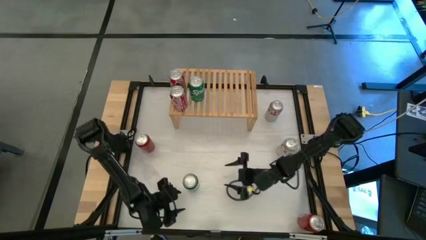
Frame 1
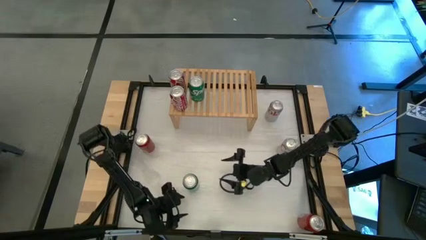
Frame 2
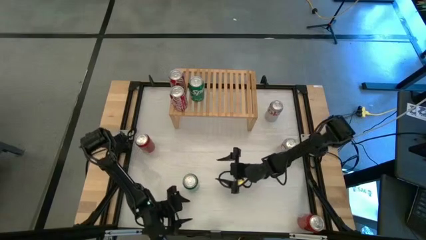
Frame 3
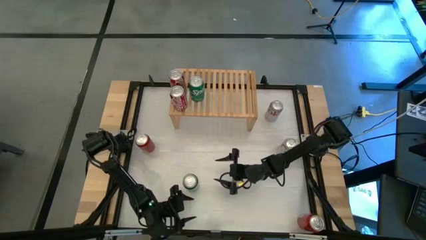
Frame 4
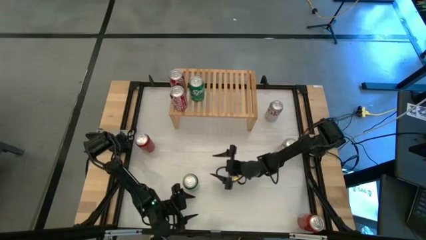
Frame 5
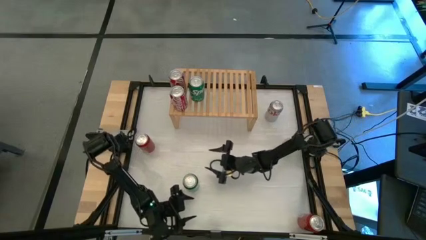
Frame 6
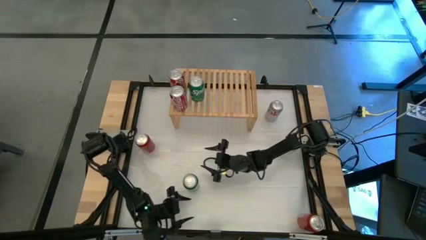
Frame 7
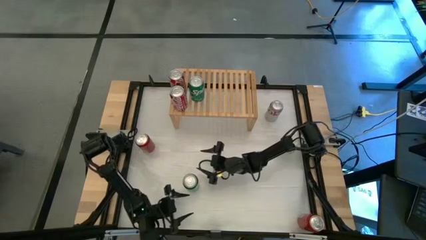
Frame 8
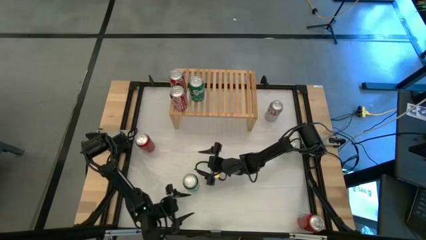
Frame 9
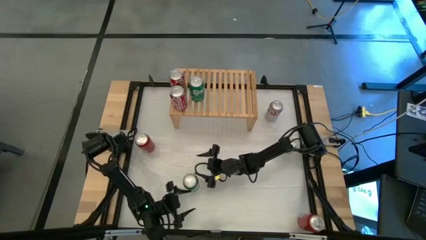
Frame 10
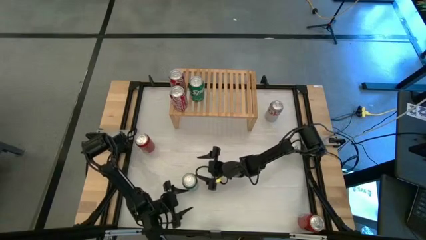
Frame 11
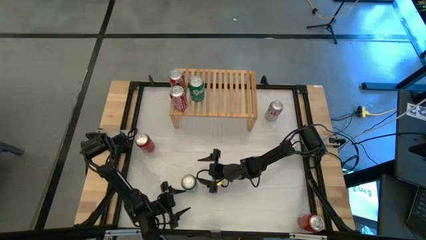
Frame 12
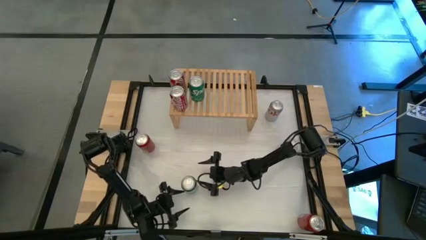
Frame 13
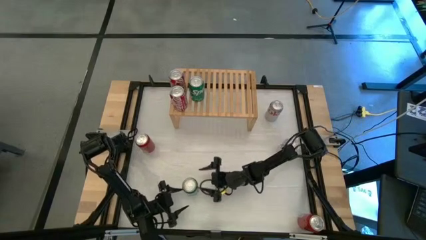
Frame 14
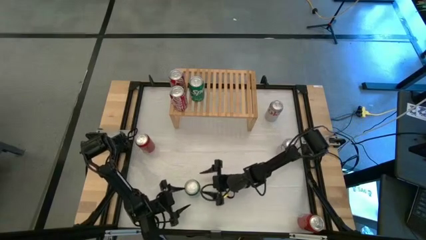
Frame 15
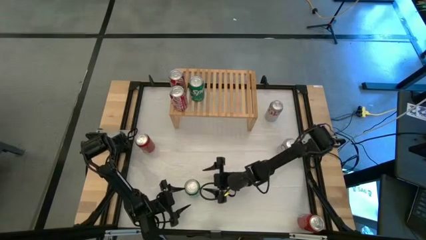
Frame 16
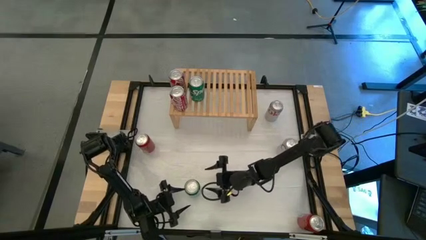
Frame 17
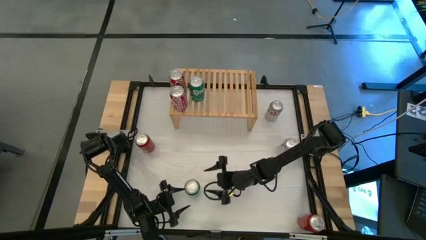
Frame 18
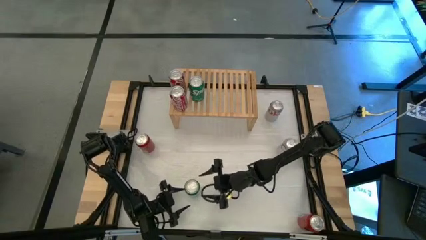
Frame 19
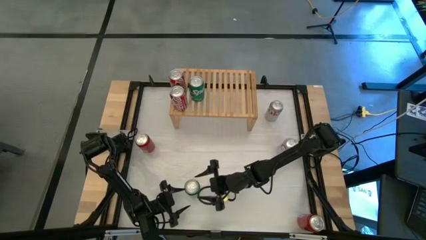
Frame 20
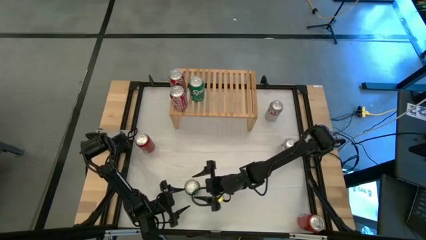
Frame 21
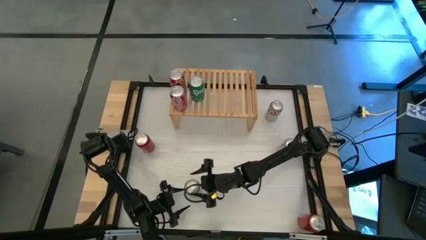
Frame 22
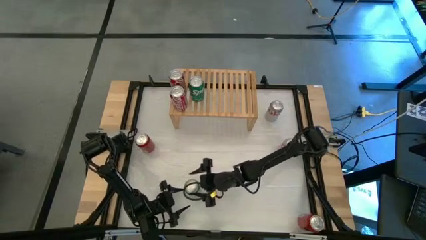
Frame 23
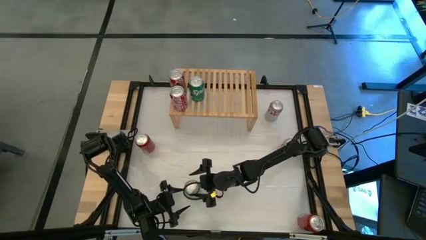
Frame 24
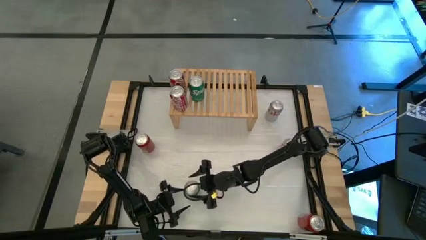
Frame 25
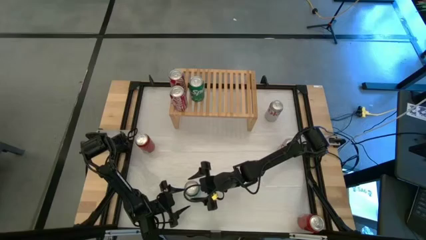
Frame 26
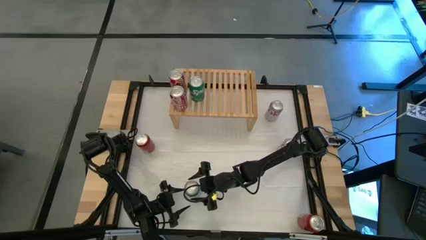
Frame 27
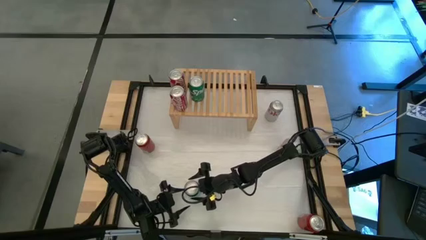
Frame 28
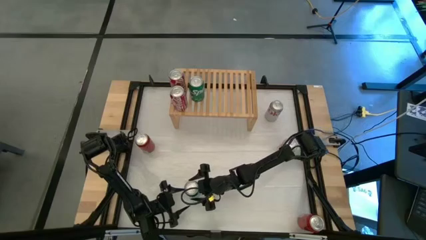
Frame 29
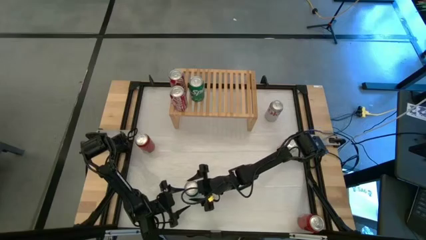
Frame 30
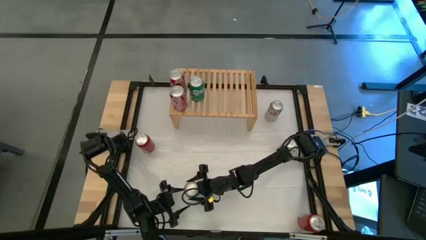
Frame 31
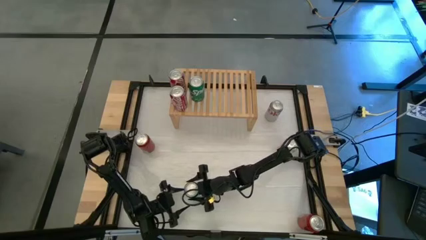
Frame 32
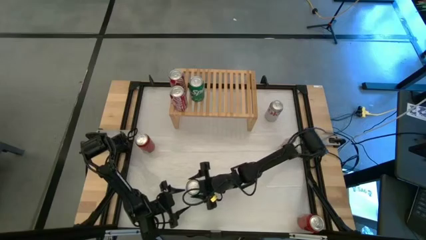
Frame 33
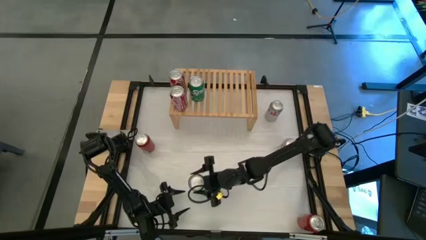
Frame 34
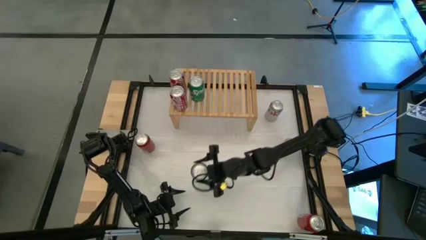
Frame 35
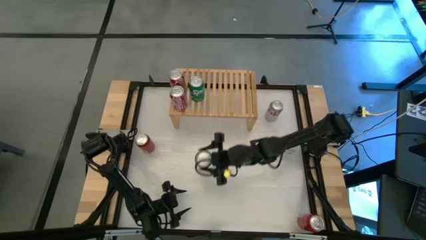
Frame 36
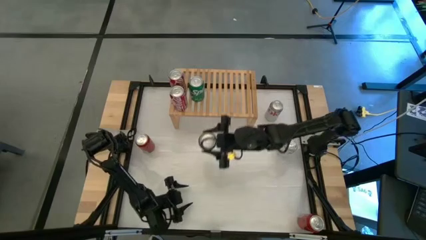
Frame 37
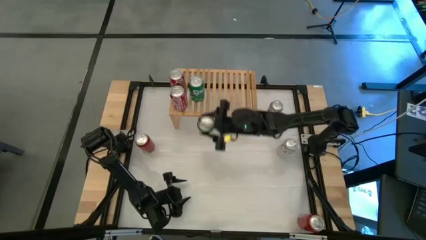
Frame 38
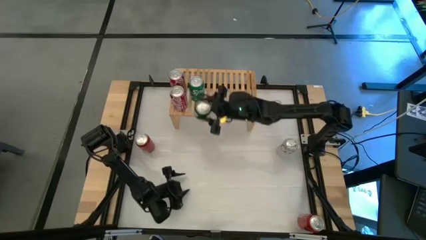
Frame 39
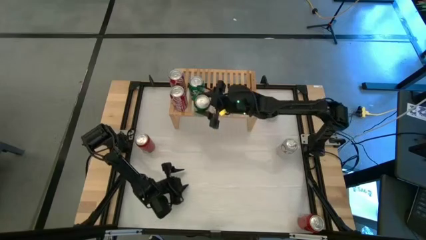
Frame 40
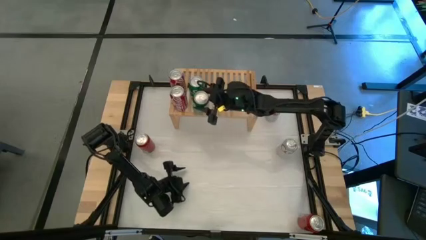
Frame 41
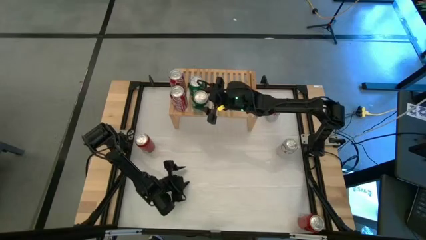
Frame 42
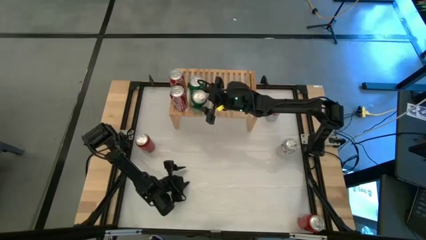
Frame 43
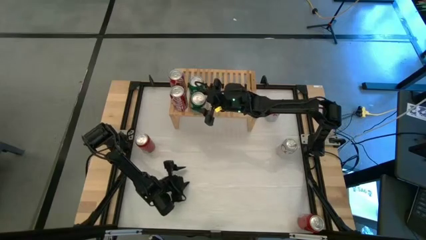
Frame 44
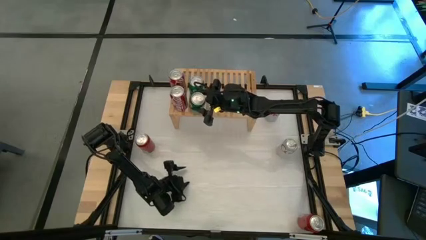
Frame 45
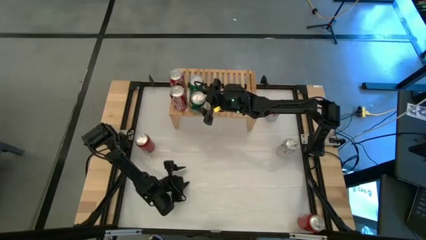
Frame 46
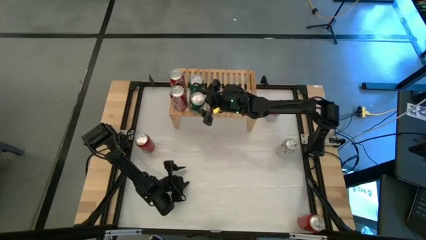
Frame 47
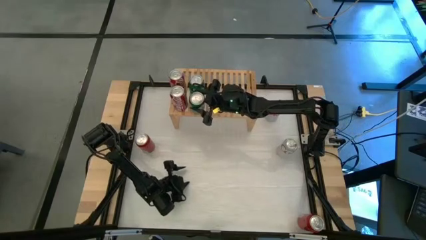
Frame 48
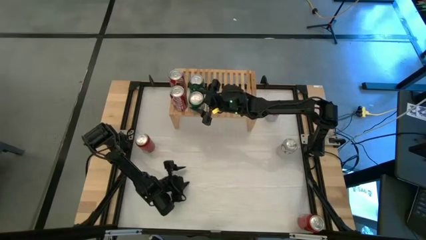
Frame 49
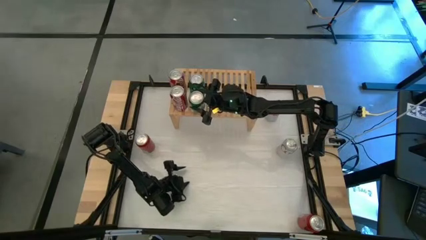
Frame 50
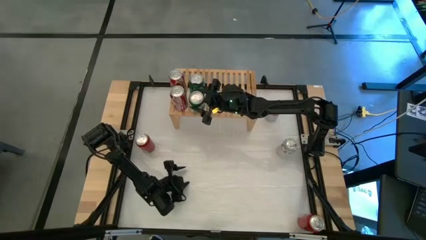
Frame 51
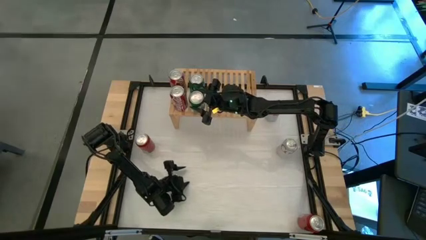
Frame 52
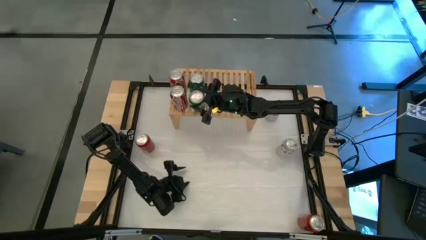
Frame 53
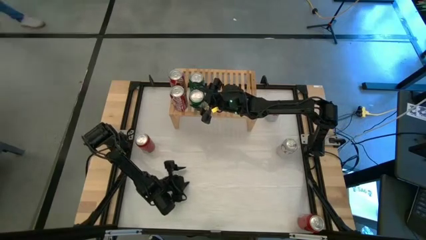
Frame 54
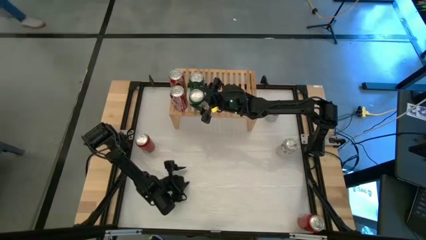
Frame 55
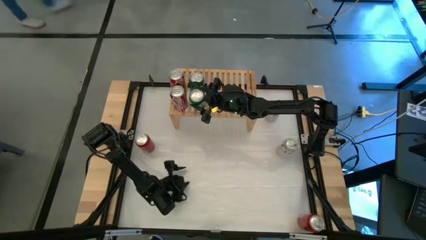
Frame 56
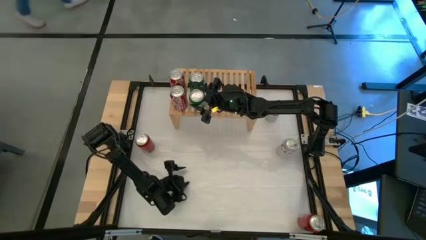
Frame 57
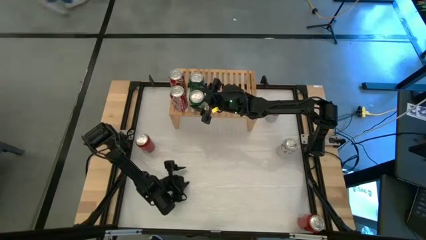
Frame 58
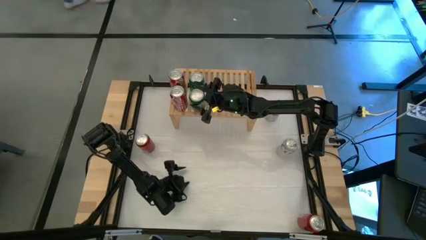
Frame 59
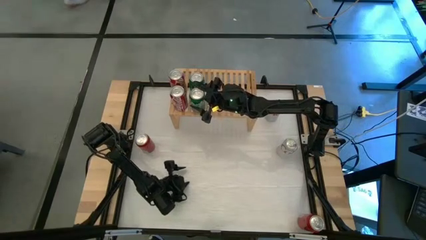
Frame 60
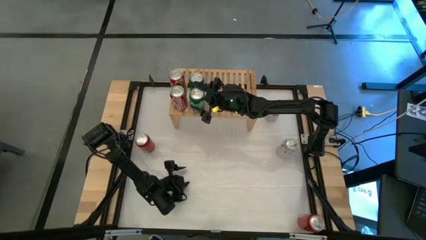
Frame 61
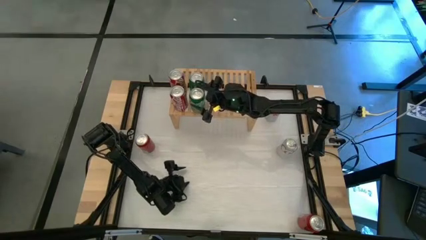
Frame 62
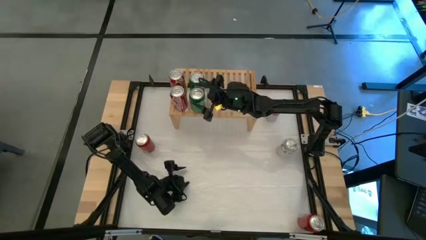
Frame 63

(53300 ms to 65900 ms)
Task: Place canned beverage on shelf
Put the green soda can on the shelf aligned with the other green soda can
